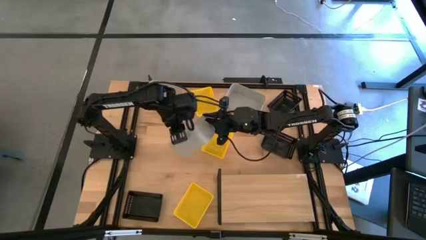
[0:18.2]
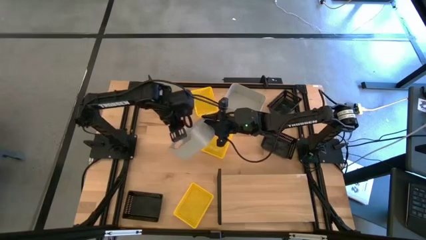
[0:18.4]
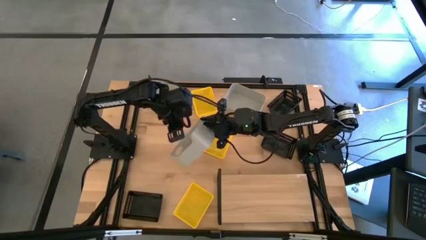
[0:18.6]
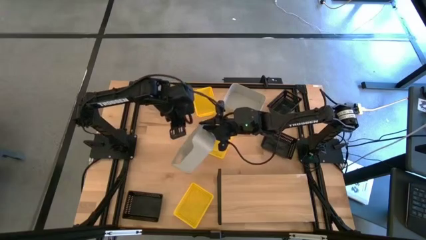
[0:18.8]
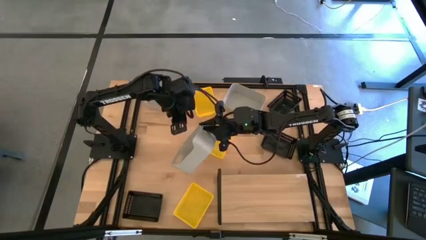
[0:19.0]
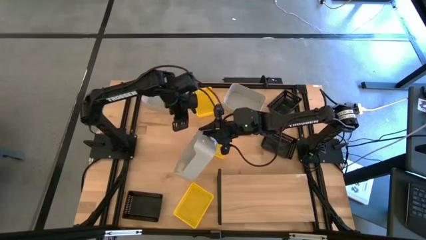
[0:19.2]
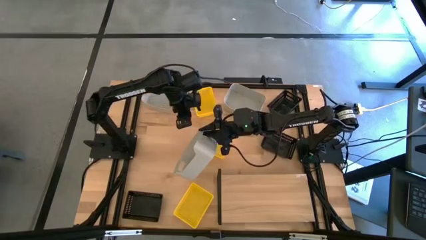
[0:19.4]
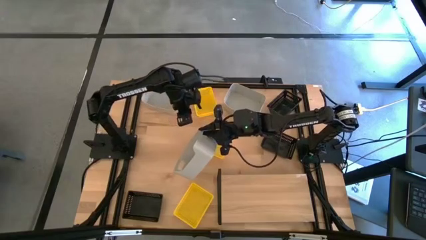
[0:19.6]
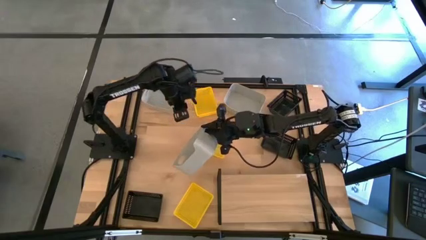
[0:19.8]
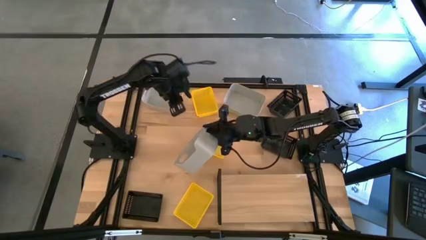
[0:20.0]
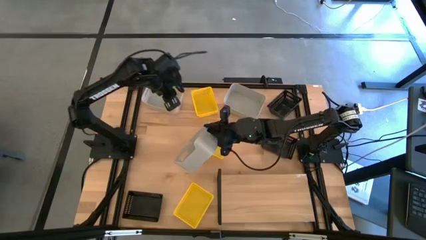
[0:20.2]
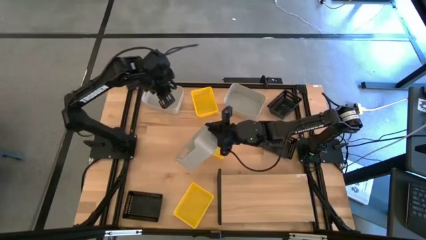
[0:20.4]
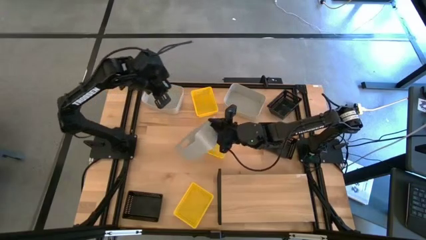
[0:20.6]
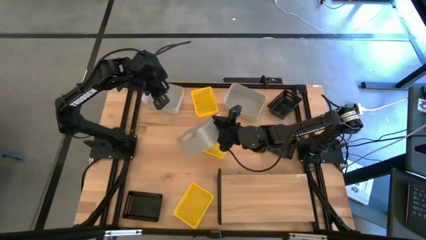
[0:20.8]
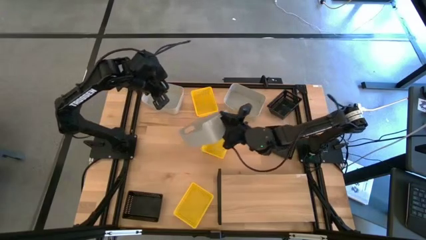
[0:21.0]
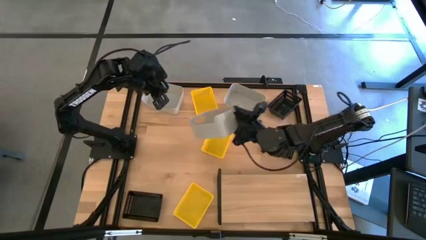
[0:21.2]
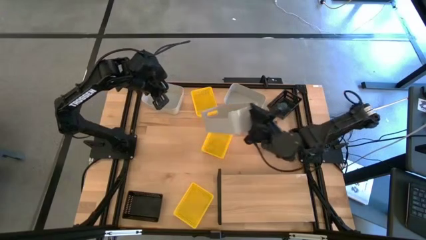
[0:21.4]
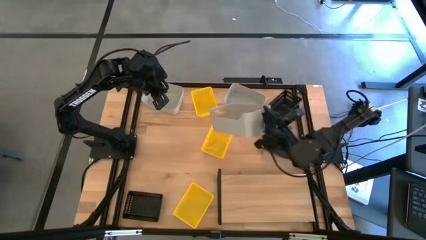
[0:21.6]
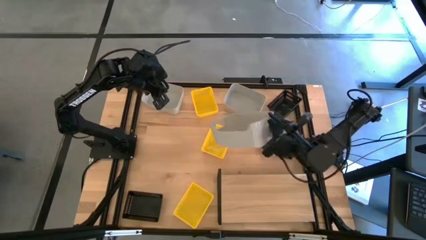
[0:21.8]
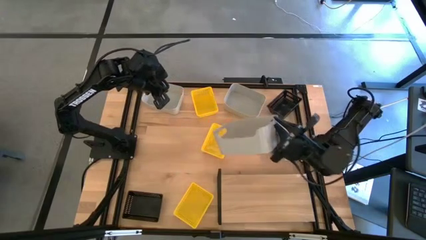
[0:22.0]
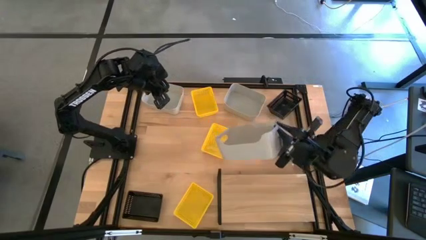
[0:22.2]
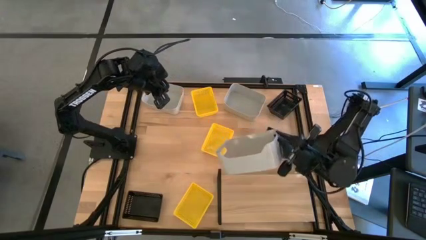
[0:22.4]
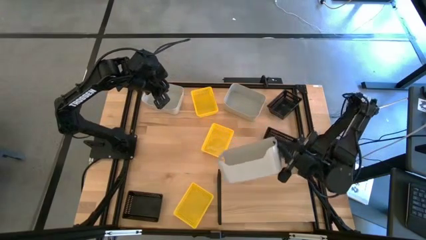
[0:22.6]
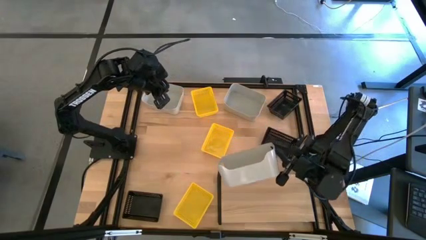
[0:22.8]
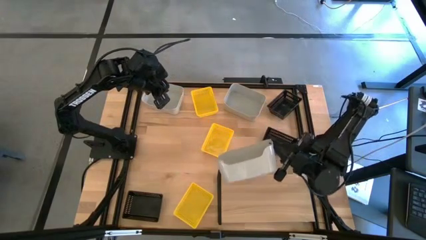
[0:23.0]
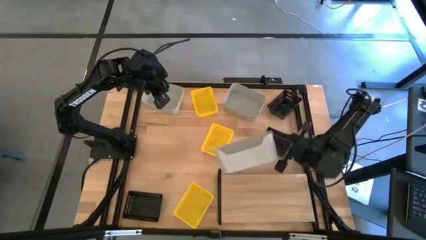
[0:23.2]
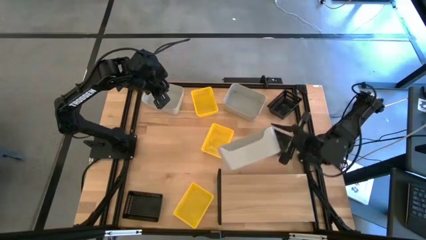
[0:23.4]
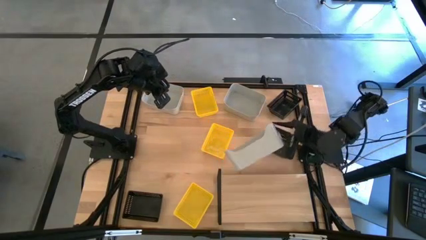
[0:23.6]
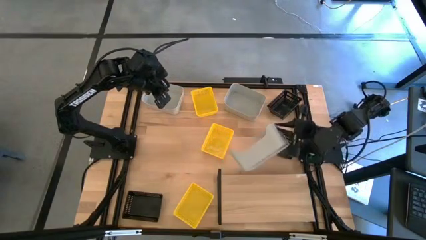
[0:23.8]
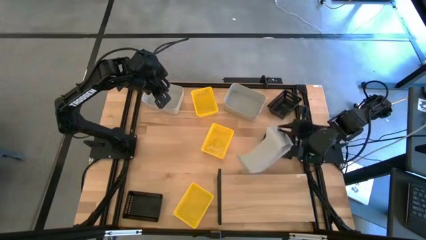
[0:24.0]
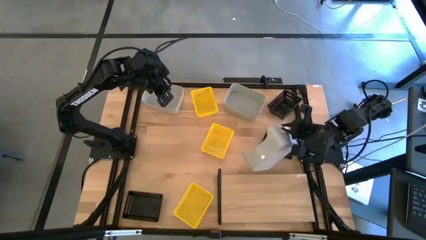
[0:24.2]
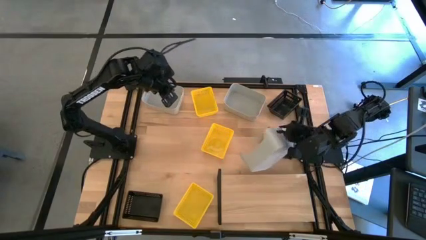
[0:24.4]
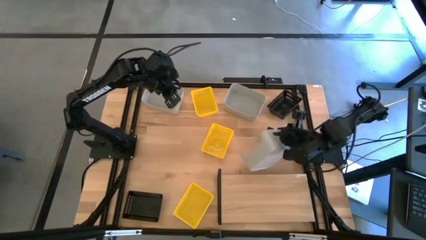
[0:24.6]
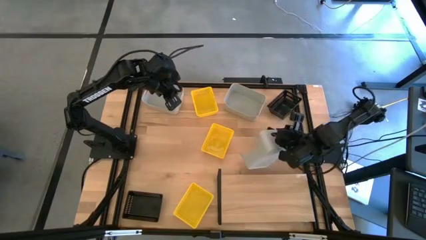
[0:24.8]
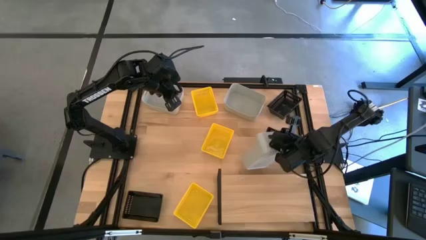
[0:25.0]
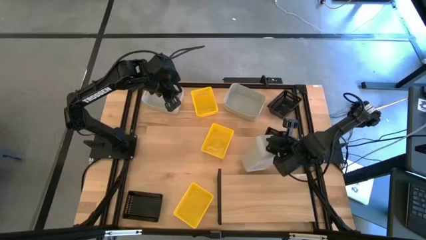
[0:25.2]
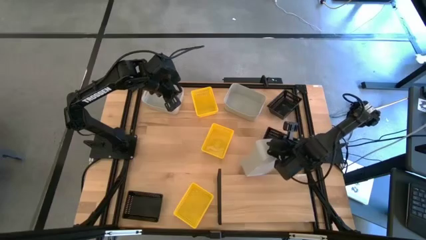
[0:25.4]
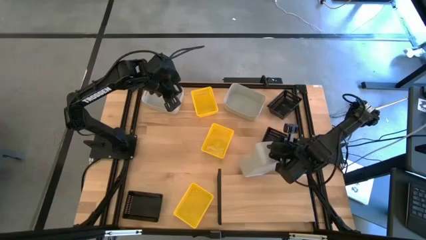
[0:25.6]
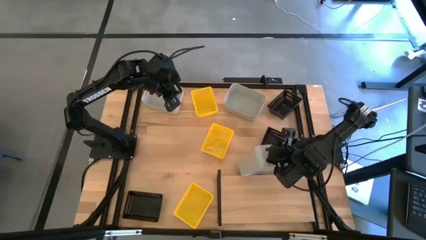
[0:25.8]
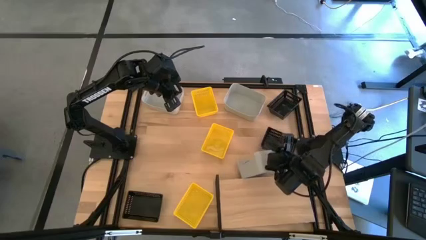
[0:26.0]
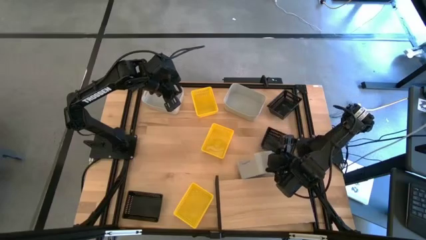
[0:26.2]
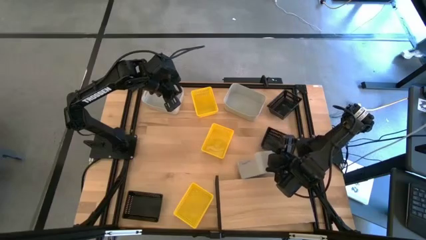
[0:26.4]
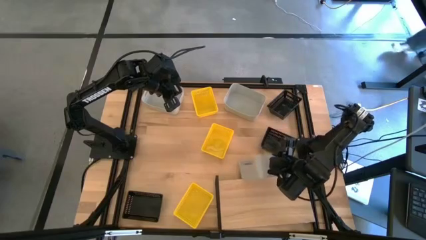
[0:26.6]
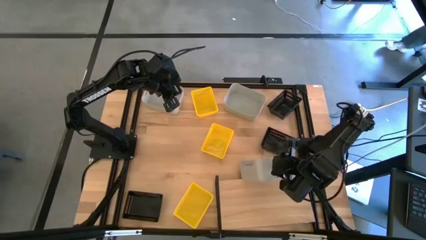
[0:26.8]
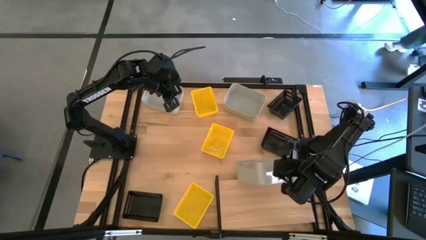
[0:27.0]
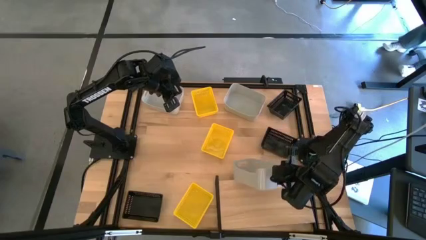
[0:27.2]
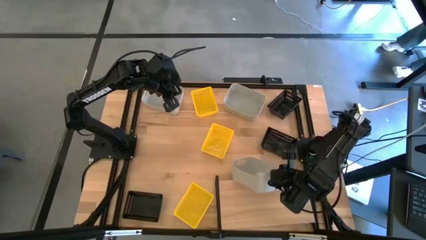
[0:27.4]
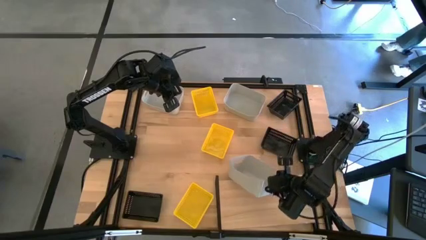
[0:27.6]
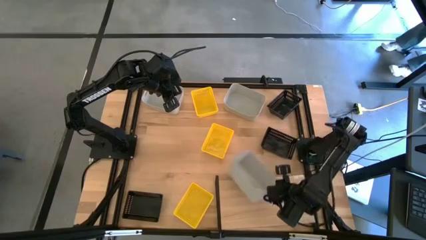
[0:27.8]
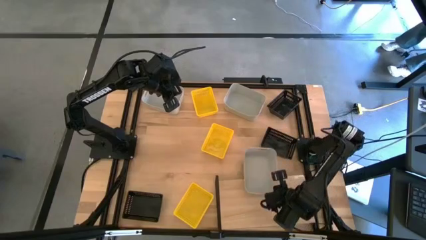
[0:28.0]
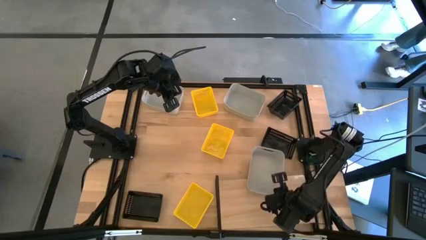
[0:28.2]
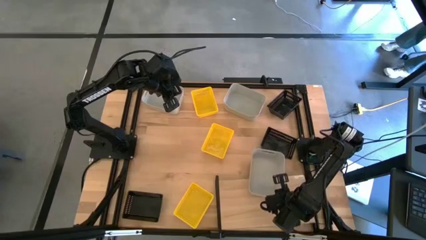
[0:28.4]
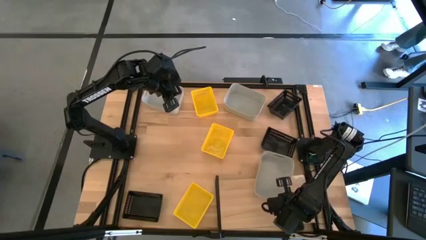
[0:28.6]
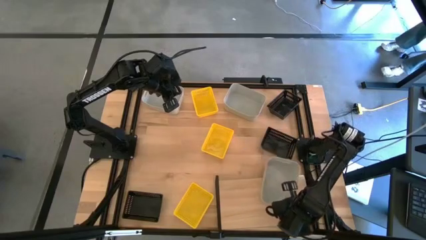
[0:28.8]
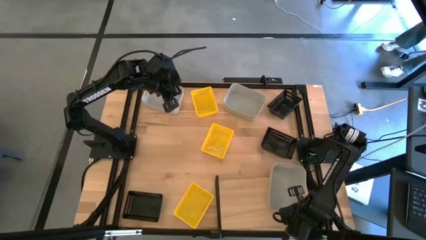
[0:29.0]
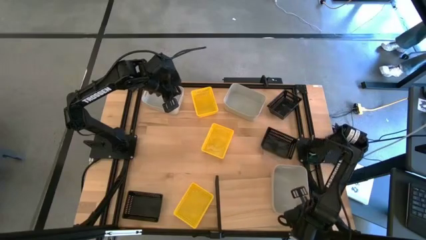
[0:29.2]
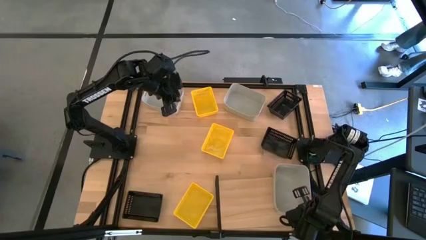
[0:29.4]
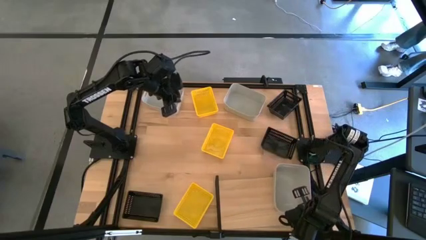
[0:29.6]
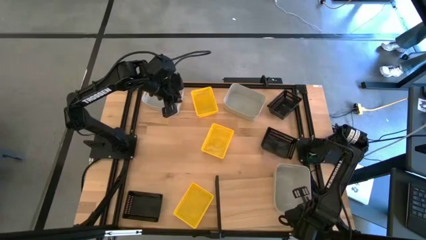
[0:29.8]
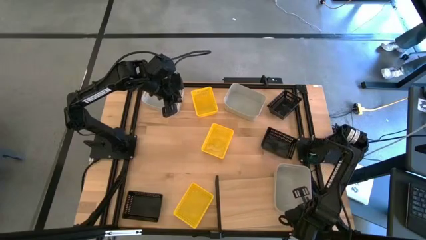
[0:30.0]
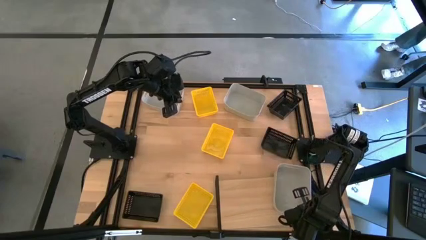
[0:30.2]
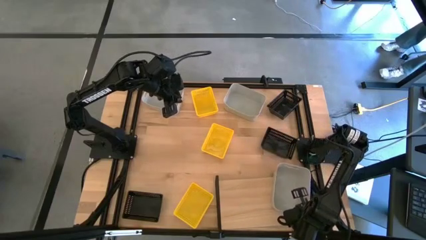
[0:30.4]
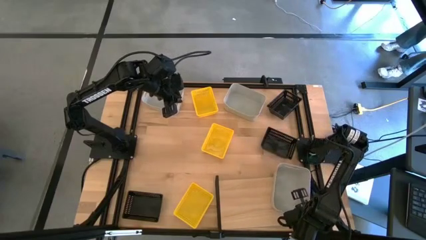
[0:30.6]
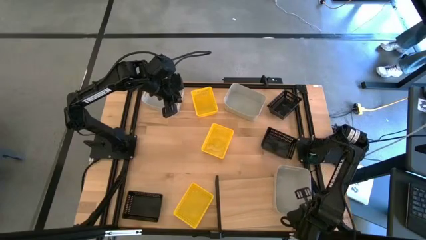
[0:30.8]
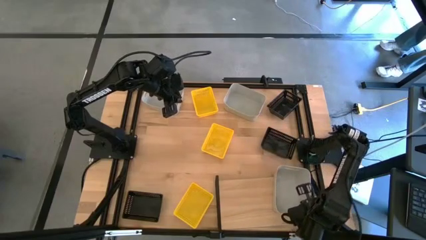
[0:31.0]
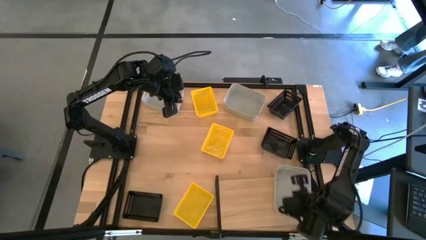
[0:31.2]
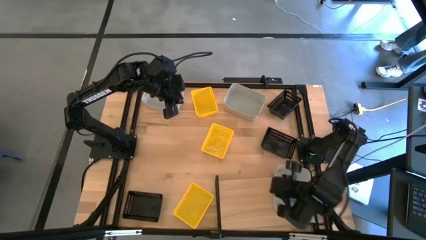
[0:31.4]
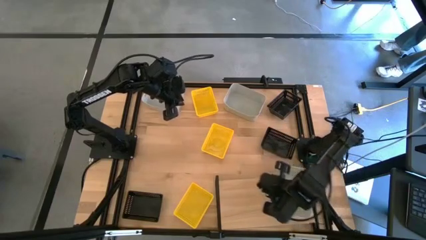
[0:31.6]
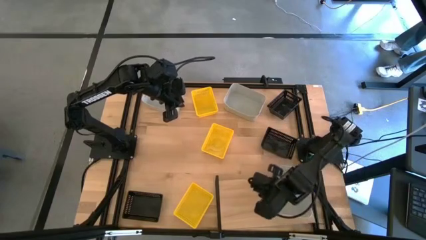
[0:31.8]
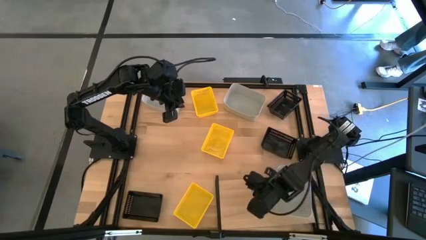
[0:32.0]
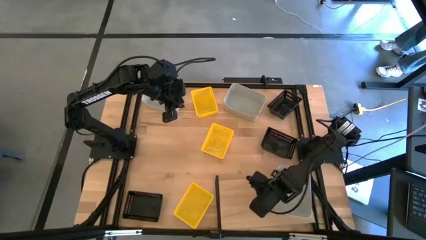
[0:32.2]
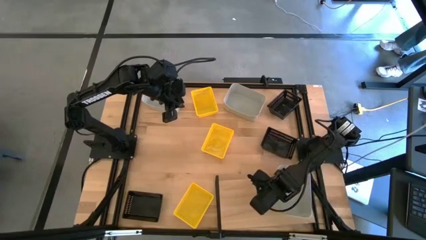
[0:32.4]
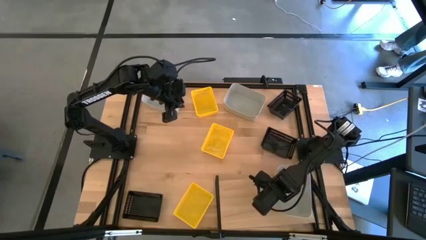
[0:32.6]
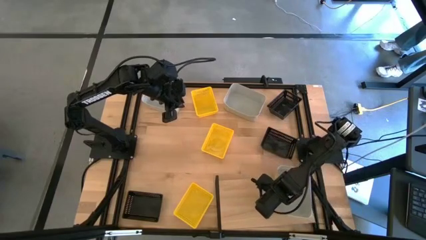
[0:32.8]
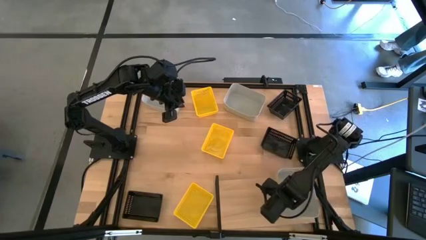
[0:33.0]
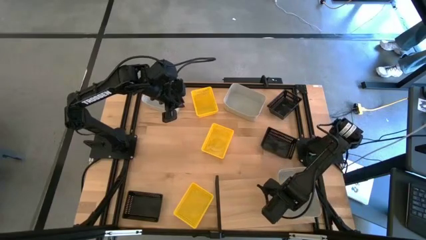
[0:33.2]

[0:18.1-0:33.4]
Task: Stack baskets on shelf by color
Put the bottom left gray bin on the shelf
